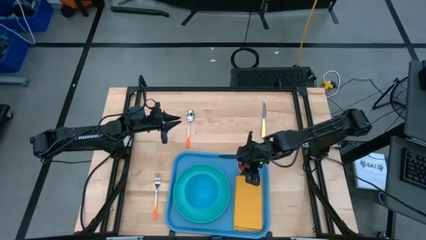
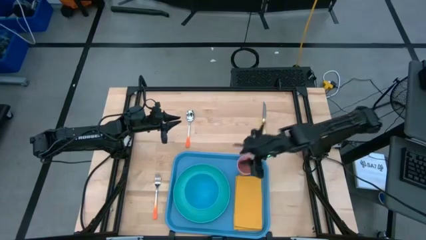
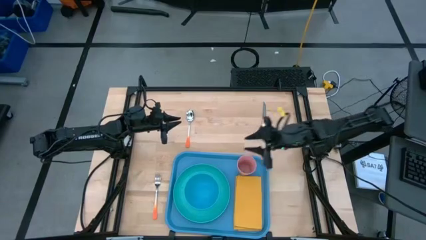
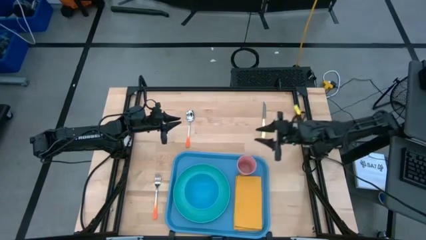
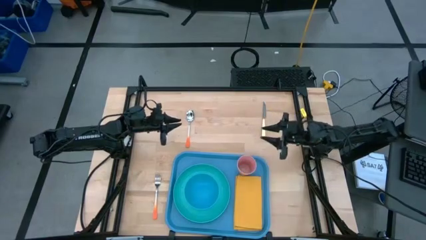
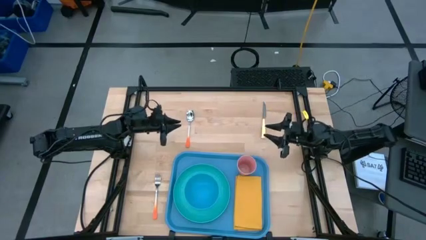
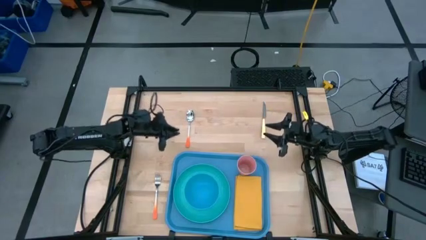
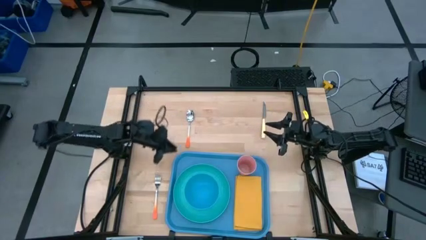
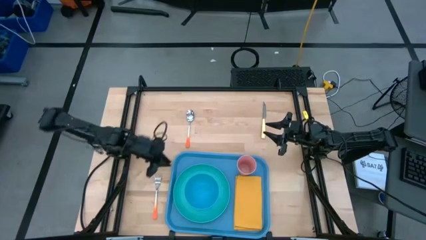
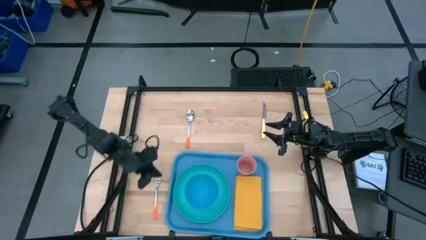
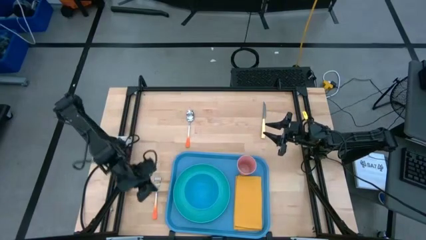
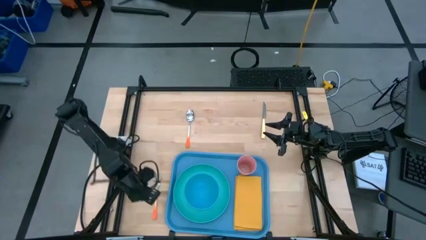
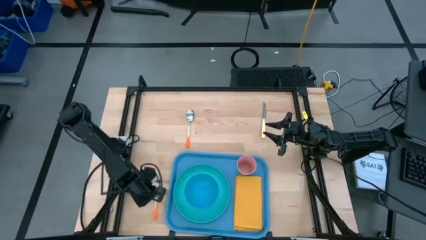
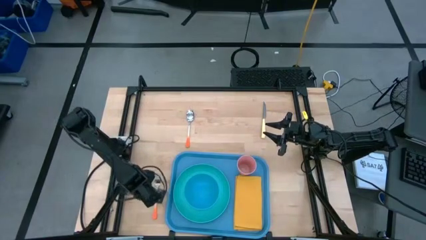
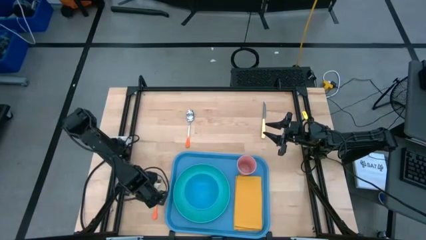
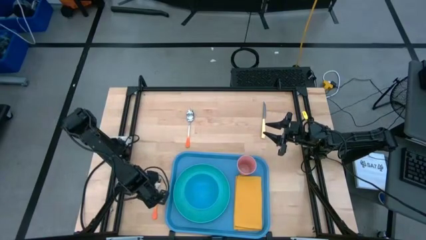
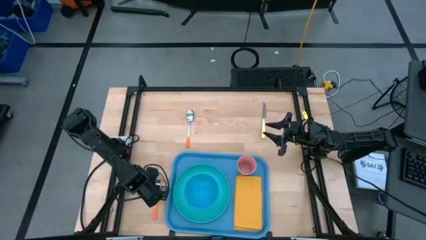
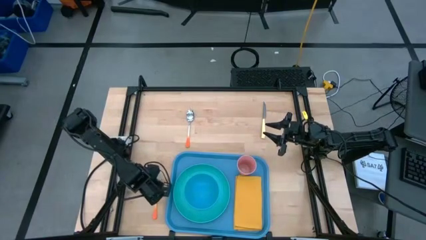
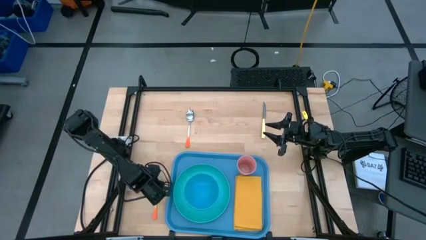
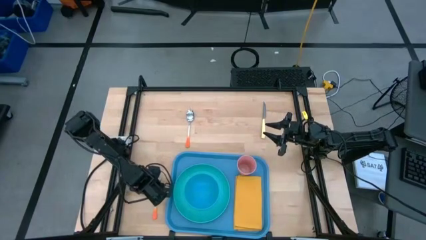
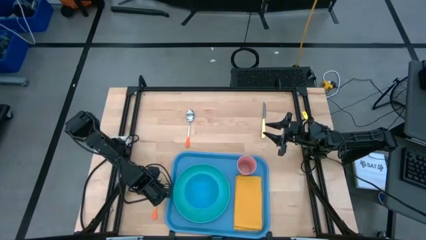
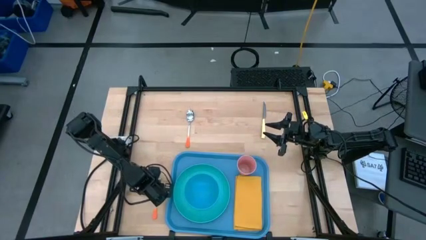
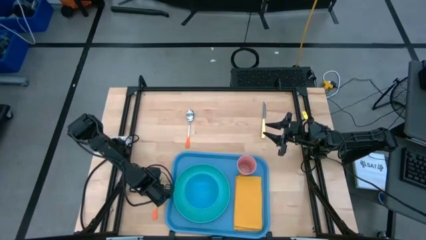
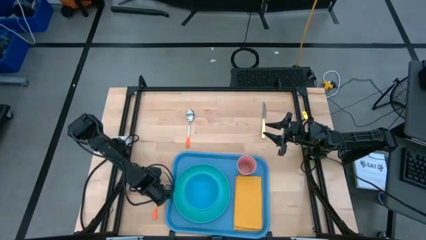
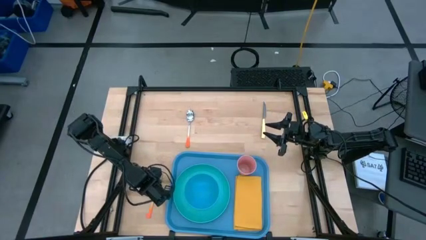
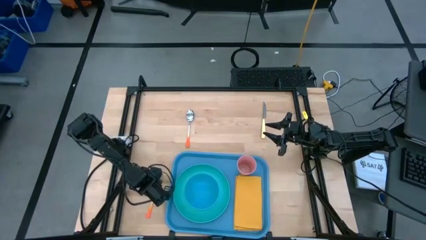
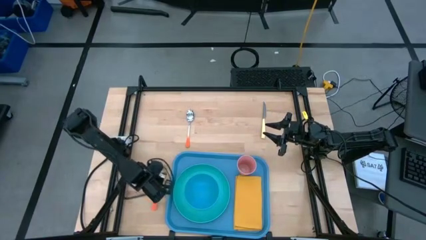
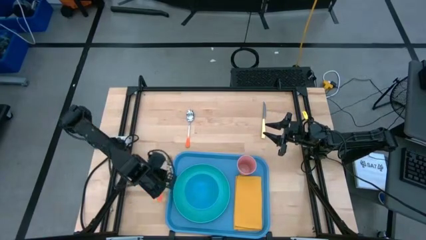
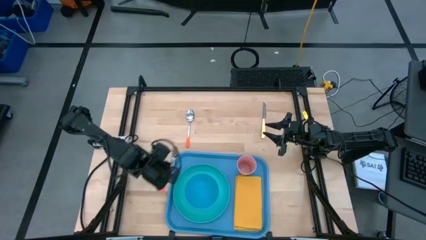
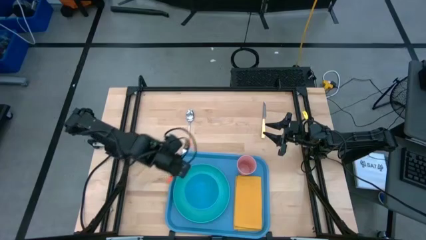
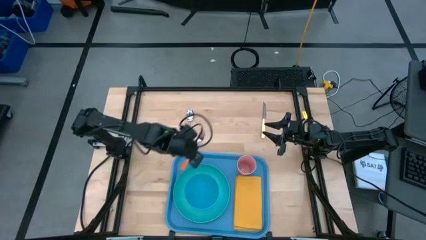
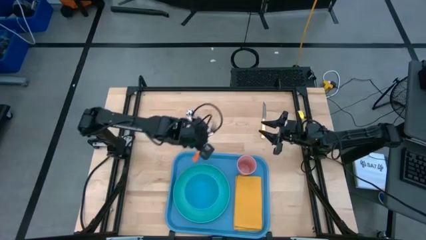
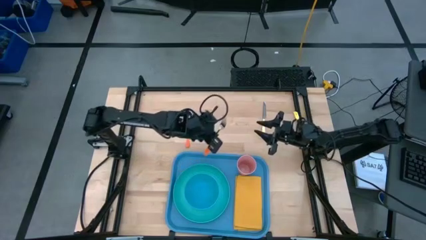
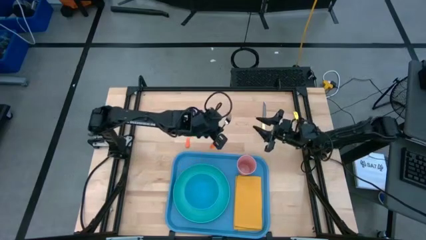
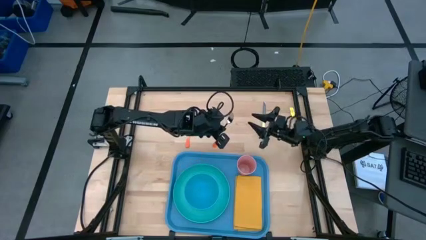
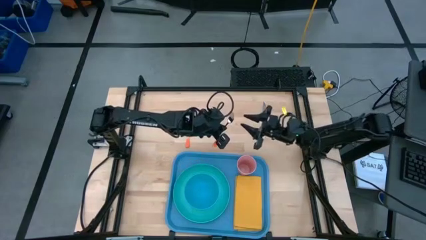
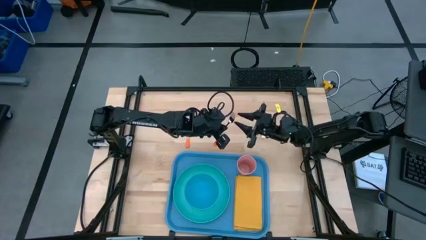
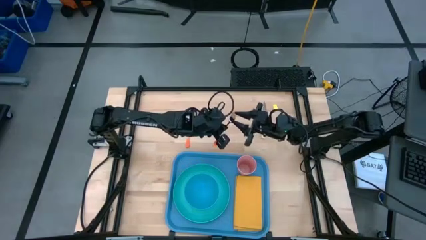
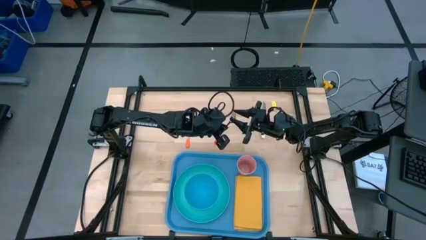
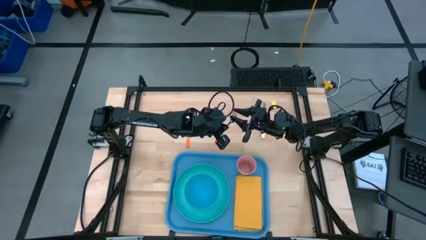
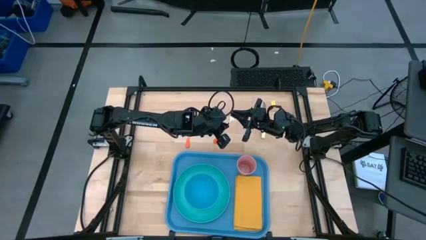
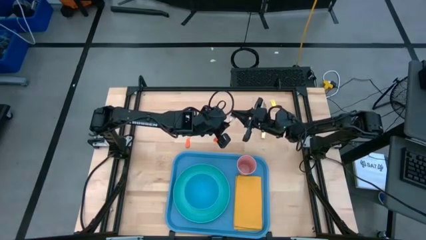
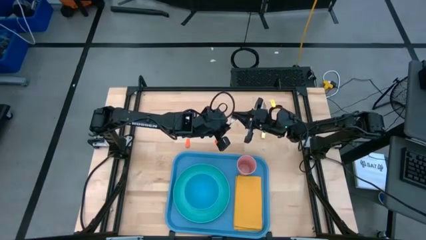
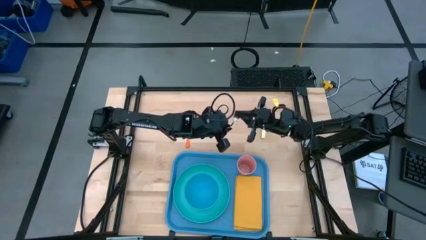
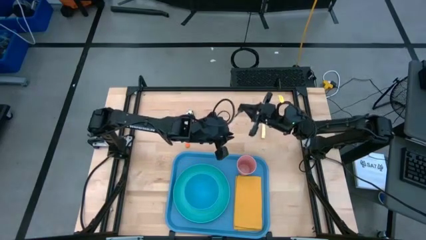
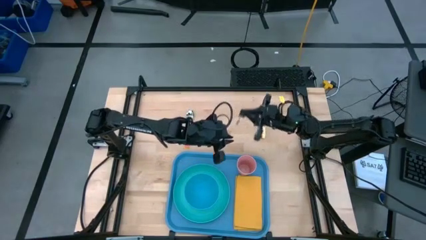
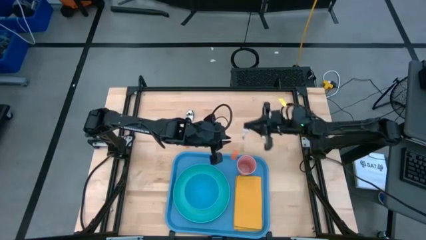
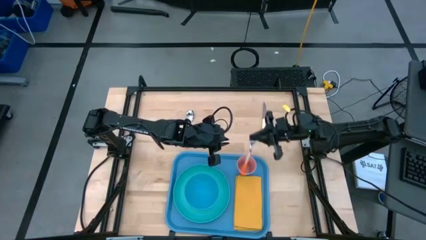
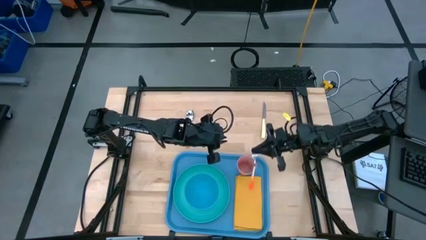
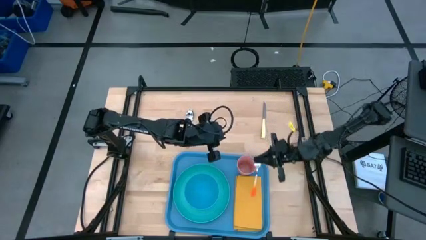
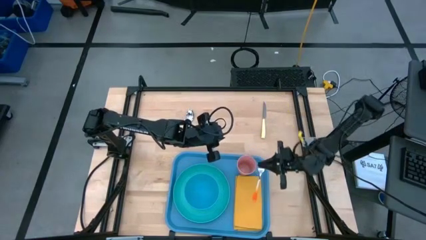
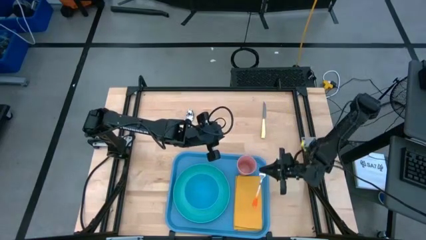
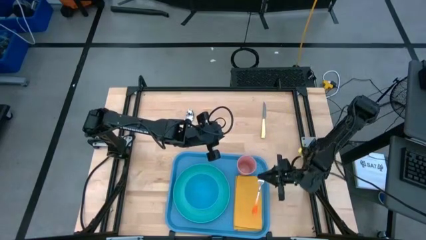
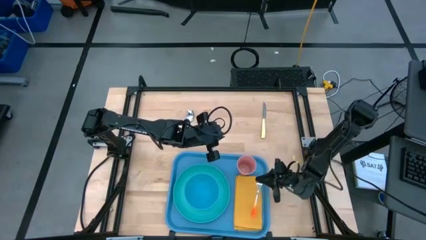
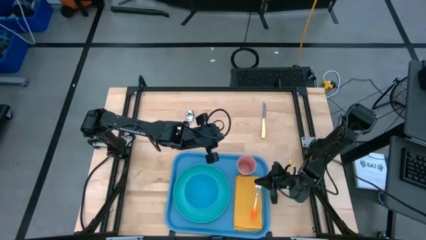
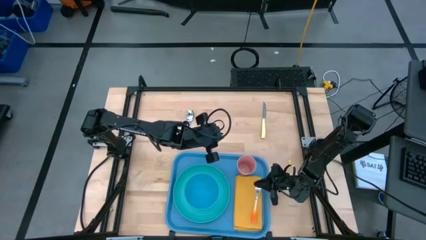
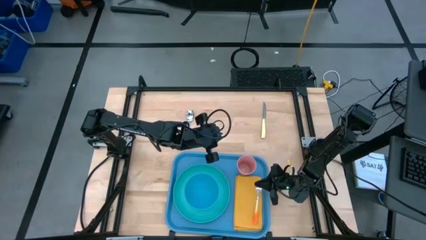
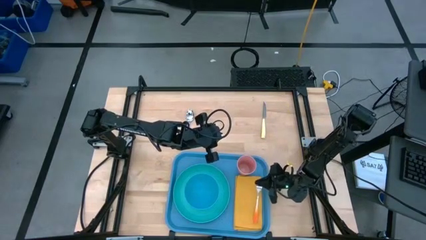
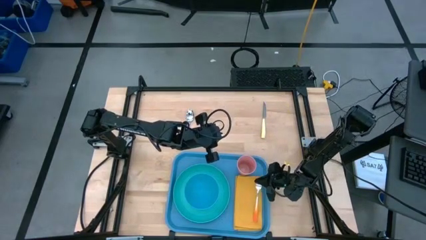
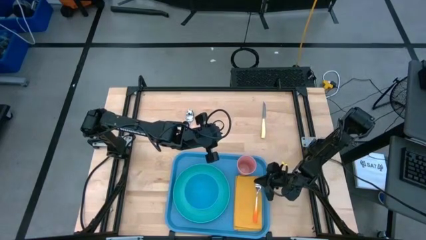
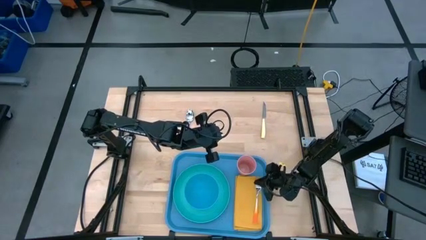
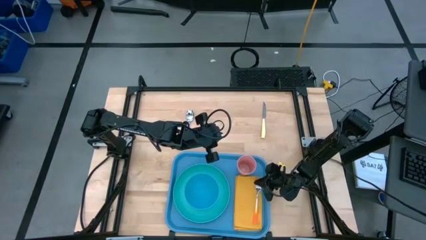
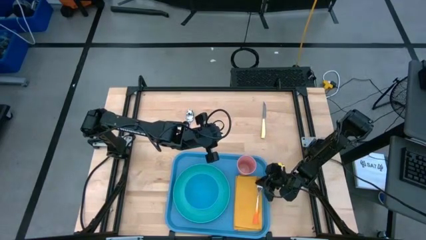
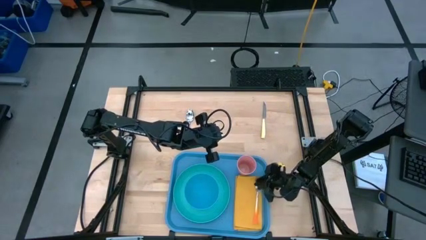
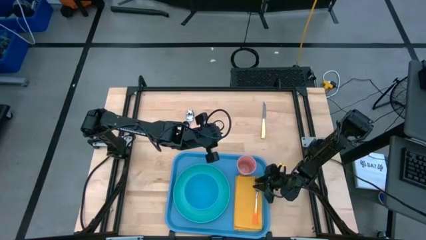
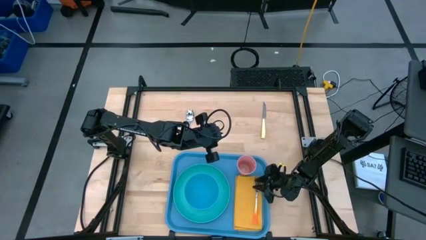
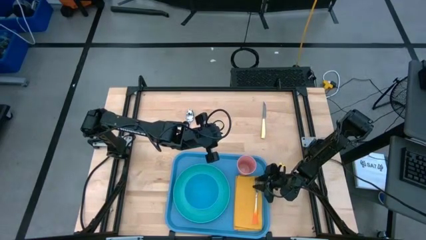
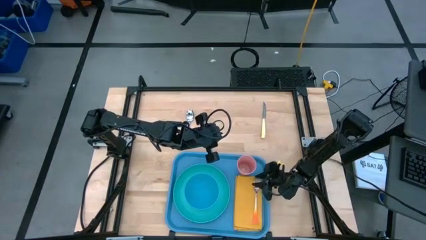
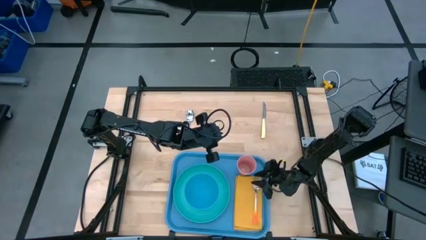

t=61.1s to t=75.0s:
Task: Set up tray
Put the orange fork on the yellow napkin

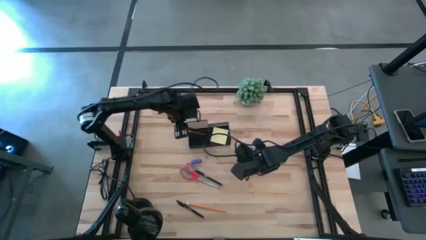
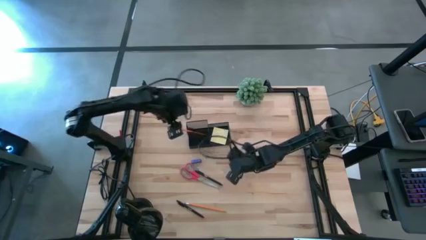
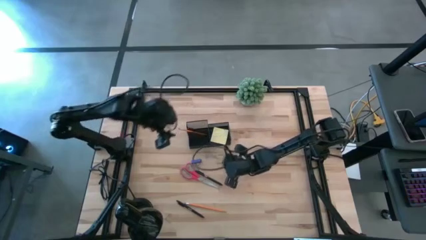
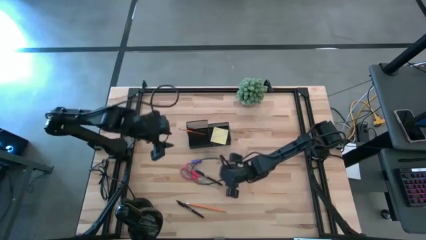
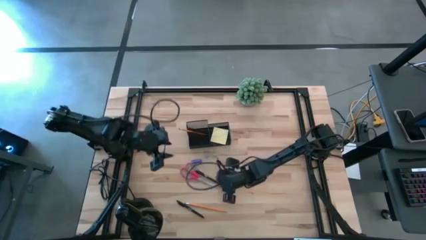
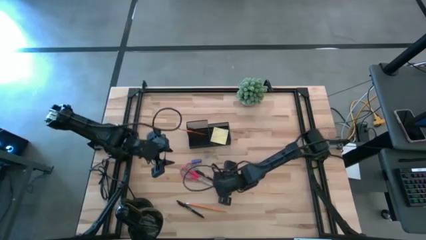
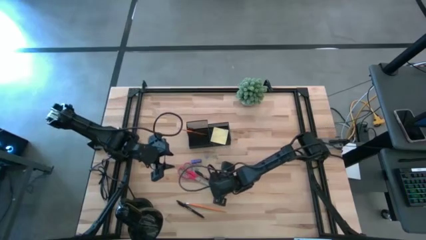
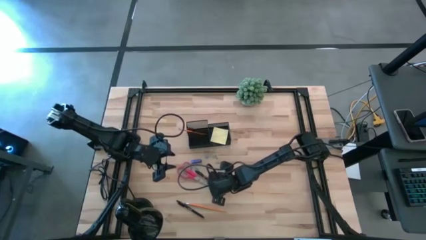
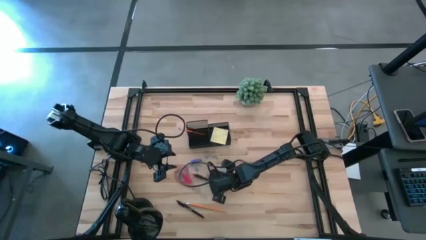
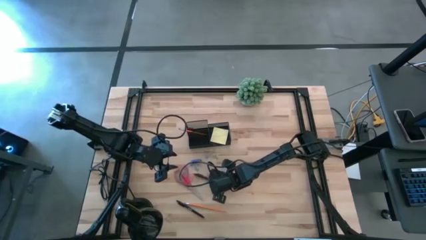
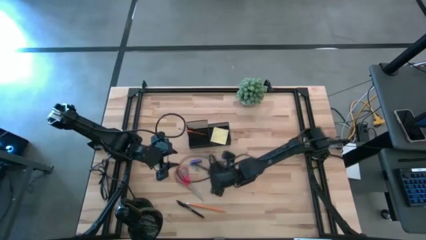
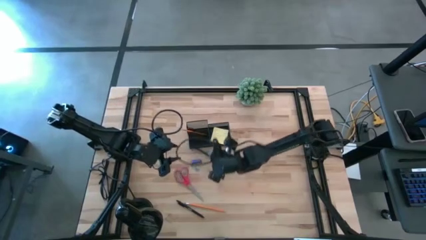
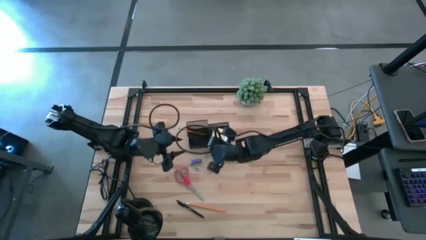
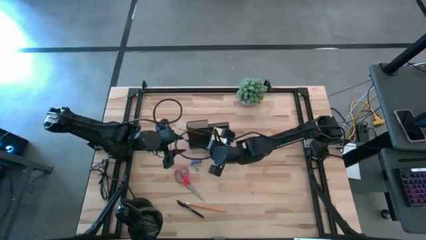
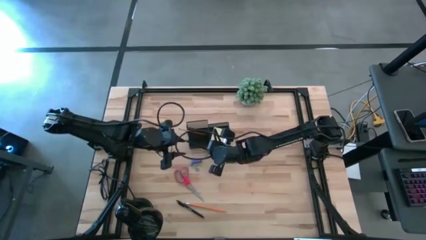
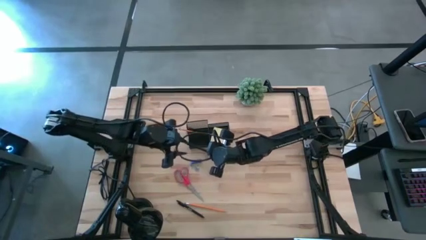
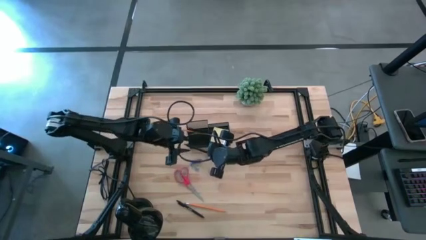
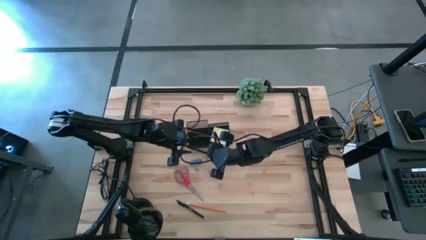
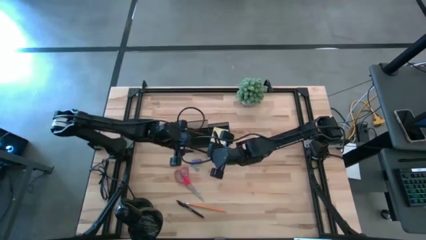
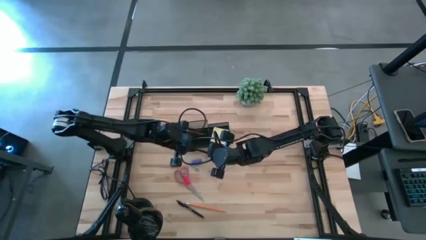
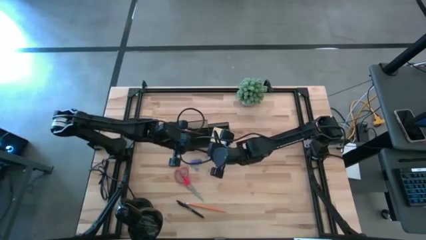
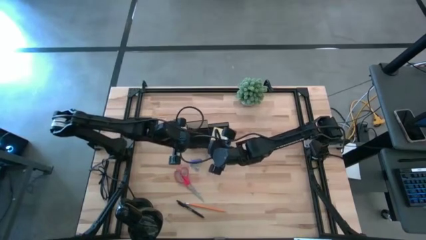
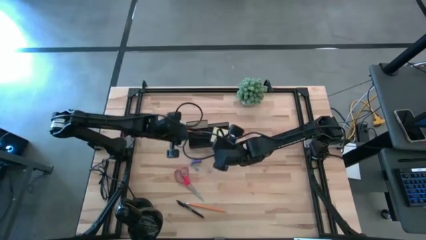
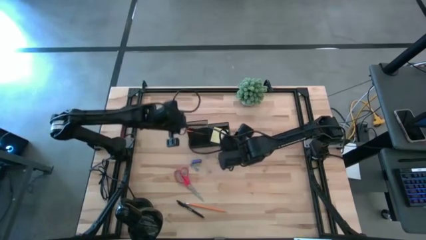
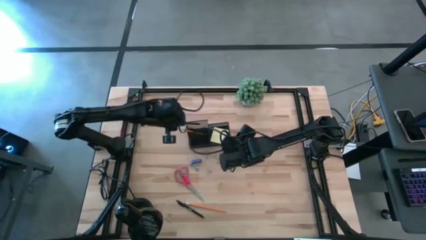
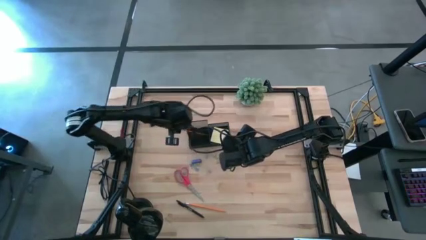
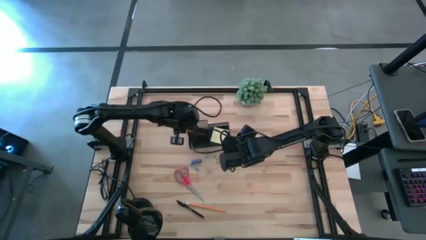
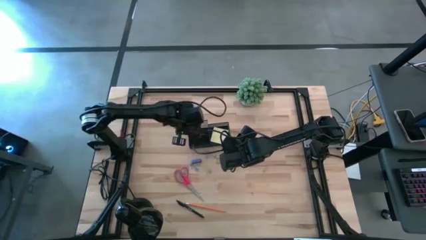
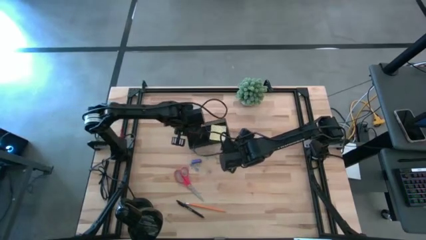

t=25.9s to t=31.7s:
Task: Pick and place office supplies into organizer
Put the top black pen into the desk organizer
